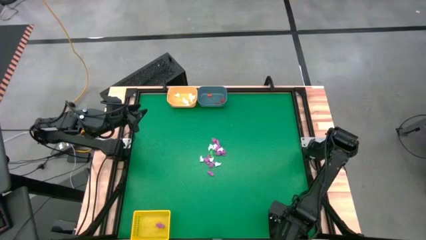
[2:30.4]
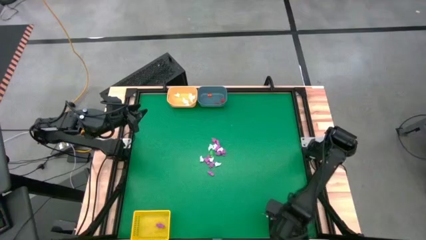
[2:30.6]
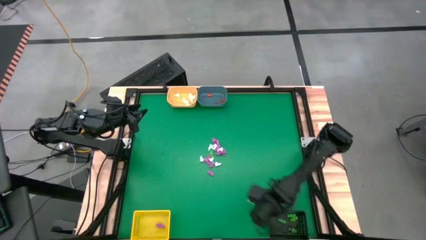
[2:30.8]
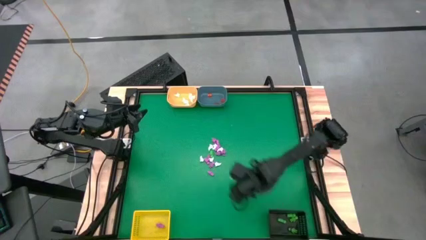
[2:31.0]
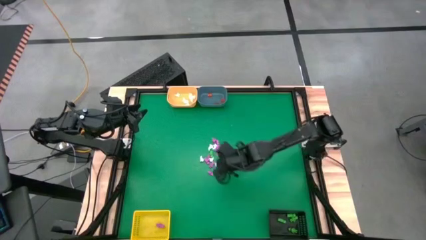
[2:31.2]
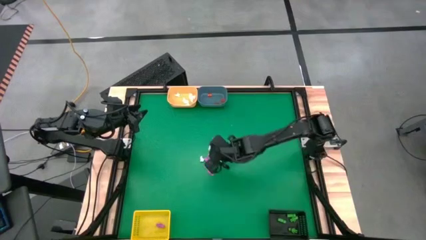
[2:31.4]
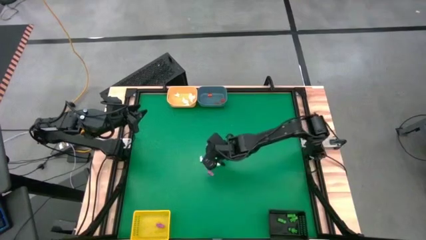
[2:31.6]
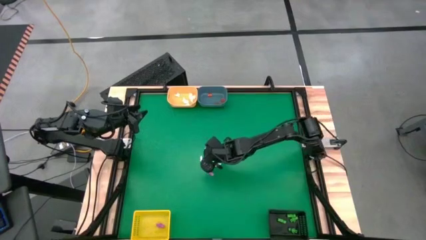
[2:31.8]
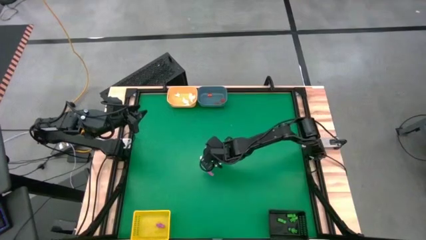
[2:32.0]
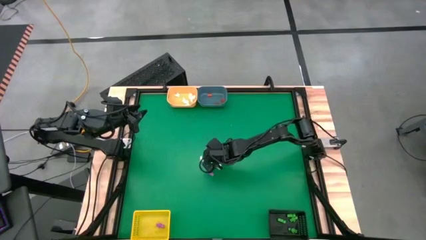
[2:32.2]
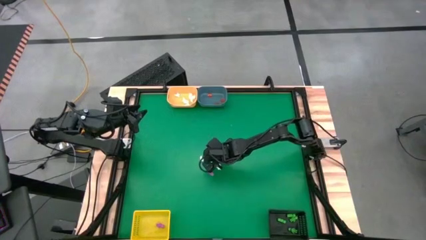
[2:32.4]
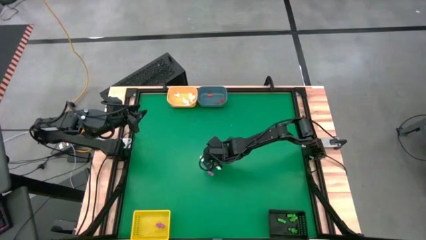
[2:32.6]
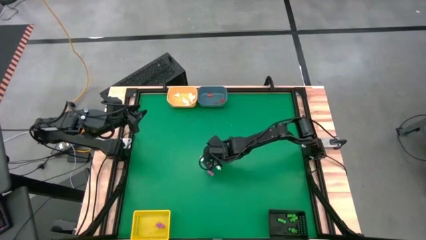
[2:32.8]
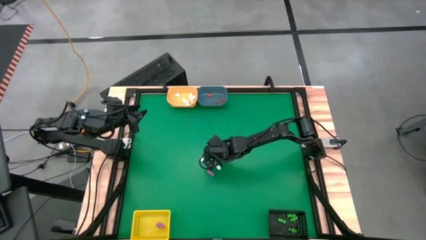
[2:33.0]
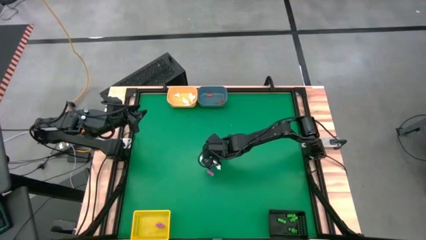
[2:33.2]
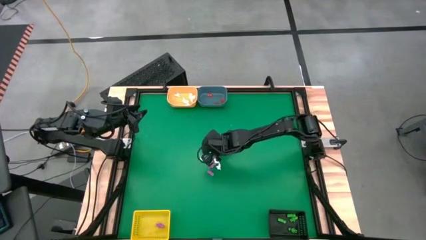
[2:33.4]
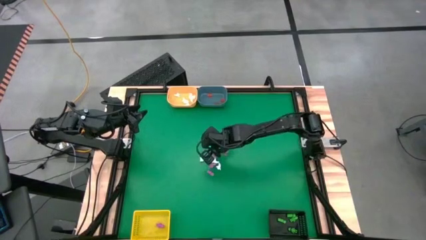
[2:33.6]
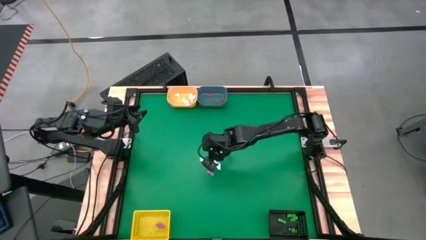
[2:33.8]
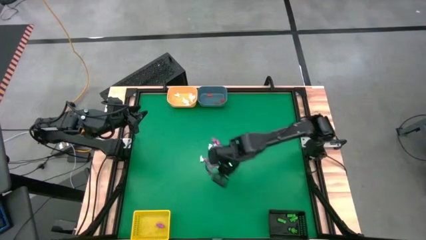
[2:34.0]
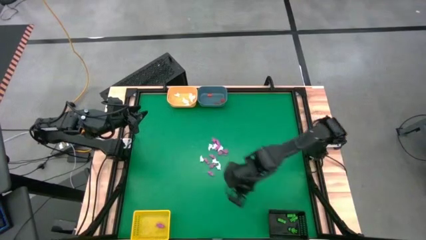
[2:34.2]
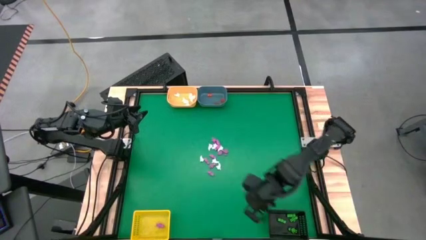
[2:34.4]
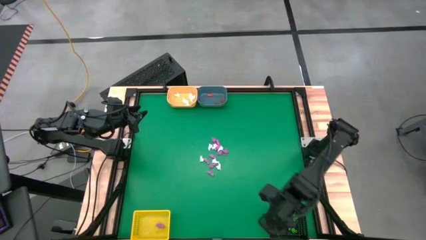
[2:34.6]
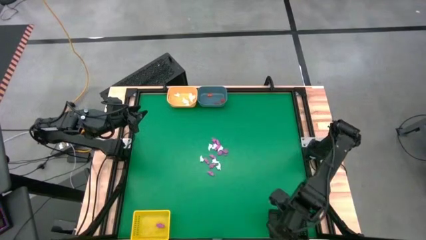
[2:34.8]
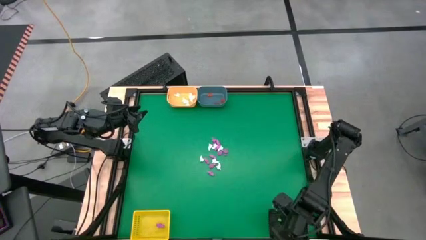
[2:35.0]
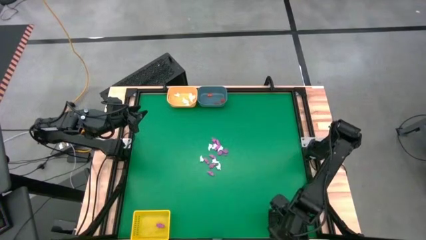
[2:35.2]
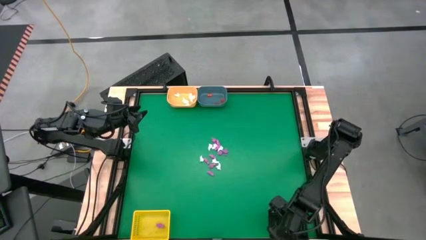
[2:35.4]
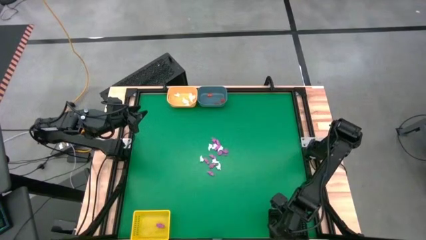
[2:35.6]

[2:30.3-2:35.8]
Task: Sort Halloween decoration
Put the green skeleton into the black bin

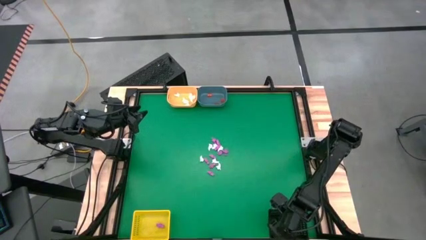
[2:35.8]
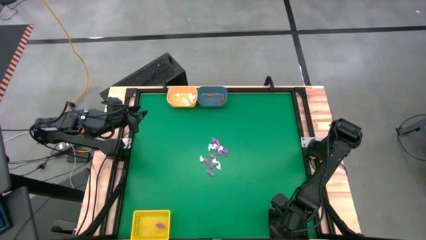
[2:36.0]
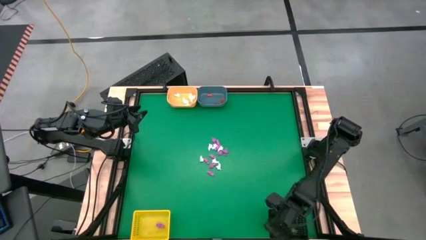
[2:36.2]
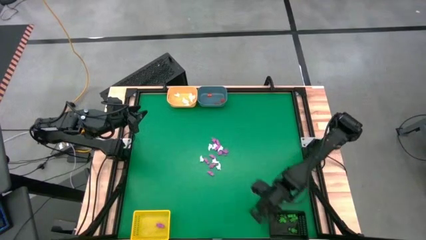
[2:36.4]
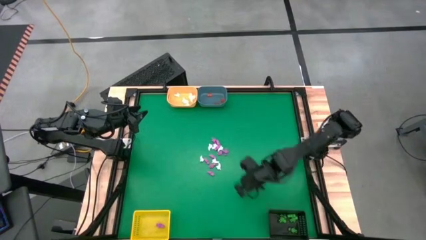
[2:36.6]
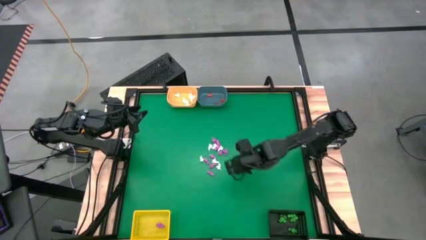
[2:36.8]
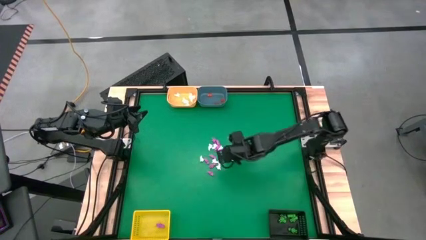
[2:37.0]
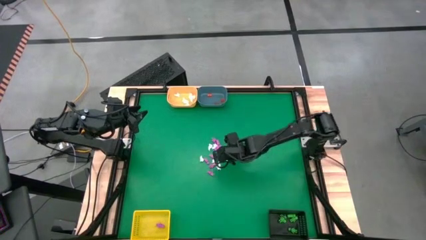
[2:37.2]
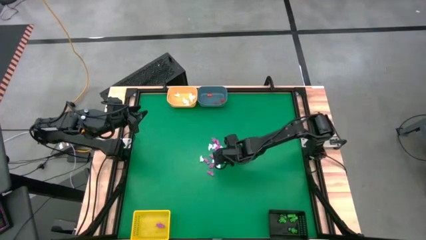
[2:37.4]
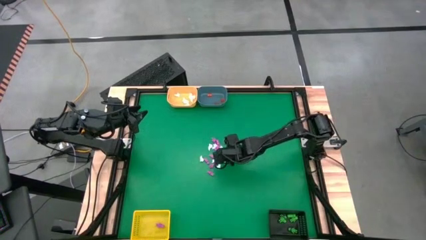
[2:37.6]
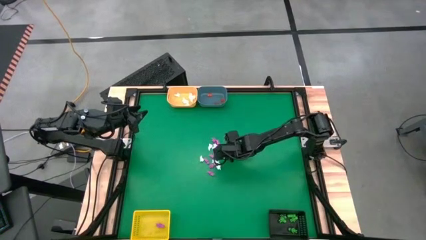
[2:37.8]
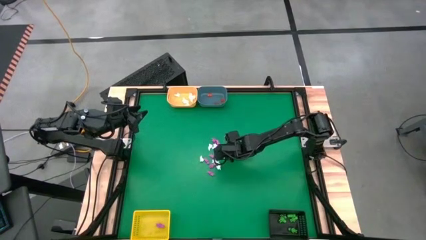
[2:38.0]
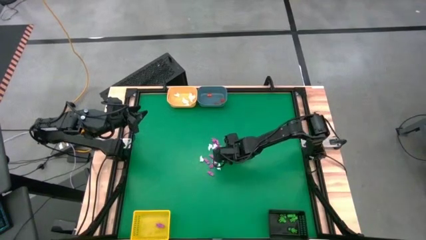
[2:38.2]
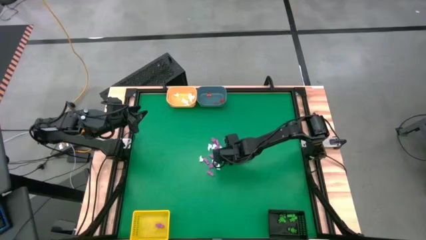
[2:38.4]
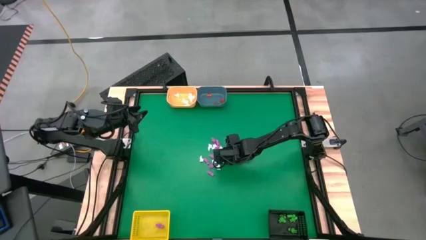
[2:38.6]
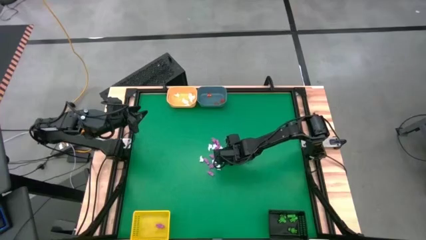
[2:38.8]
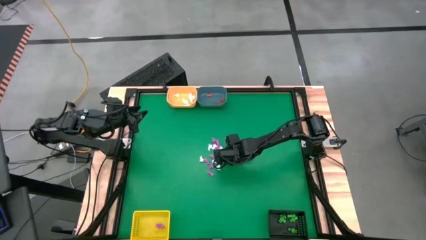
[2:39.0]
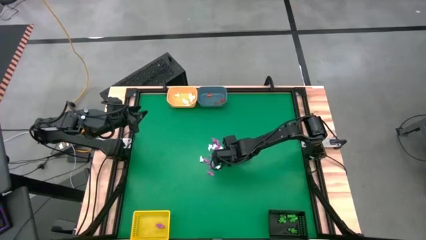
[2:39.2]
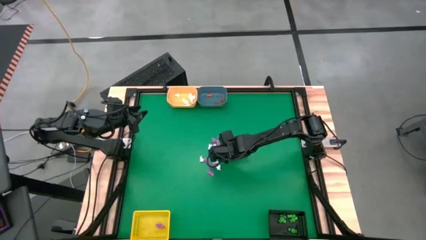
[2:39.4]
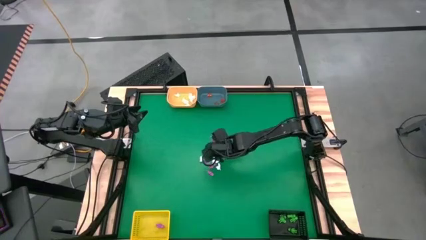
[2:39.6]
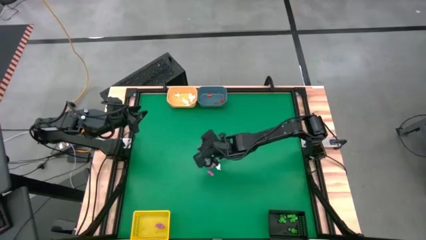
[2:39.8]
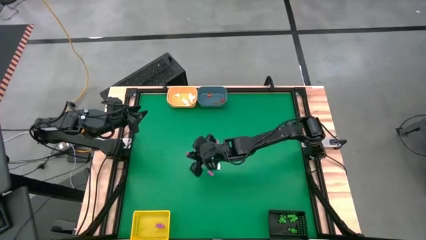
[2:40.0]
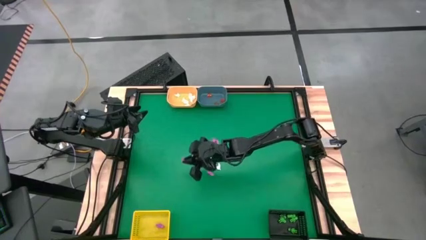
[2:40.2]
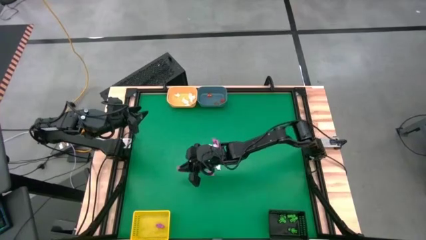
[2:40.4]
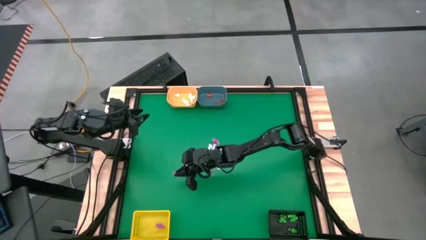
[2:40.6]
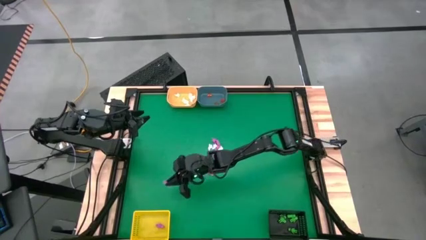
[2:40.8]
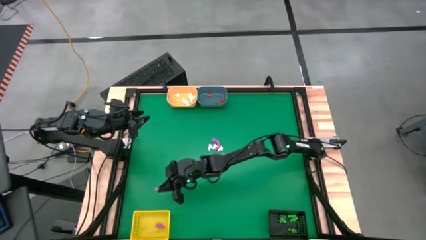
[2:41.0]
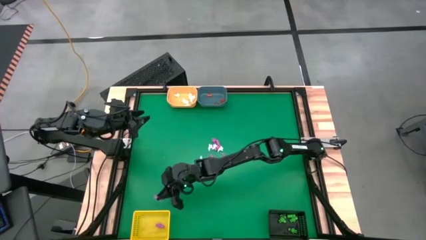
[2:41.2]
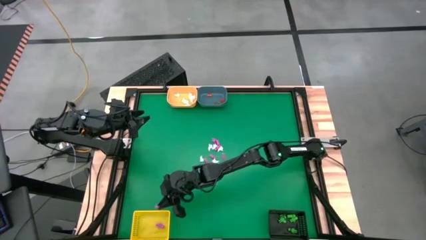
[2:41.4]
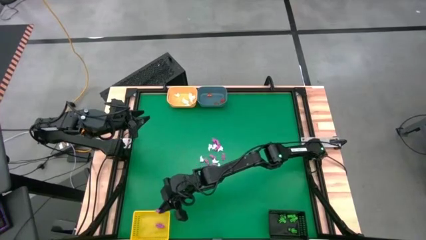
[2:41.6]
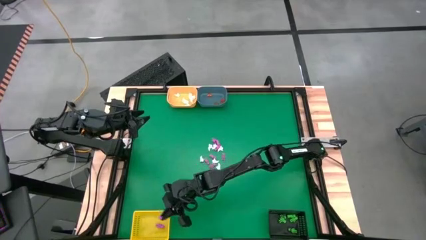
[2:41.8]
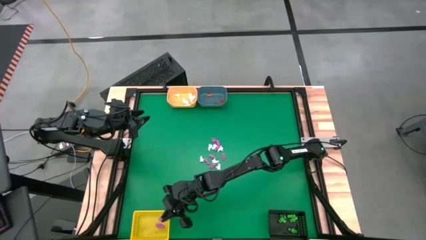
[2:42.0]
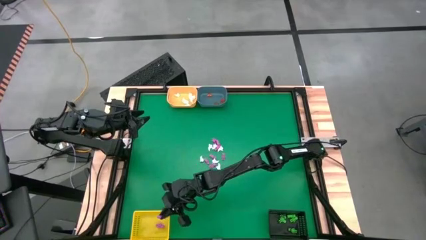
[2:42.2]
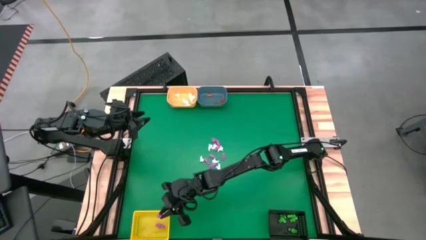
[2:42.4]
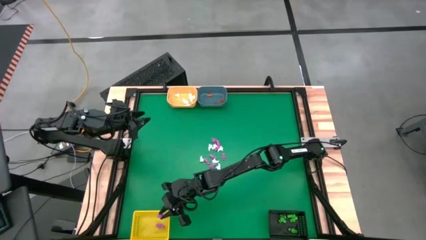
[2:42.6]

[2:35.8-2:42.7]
Put the pink skeleton into the yellow bin

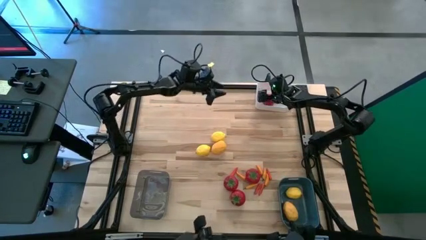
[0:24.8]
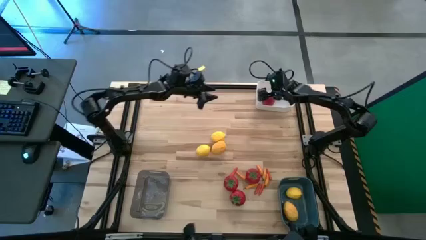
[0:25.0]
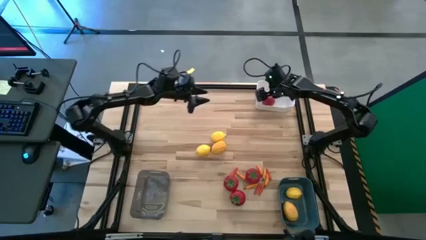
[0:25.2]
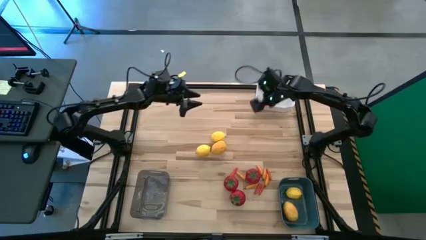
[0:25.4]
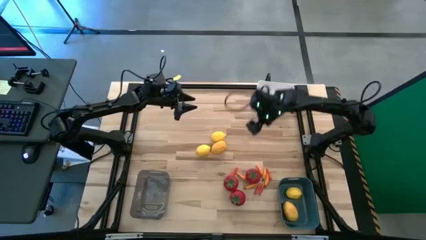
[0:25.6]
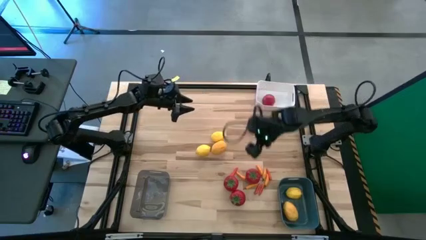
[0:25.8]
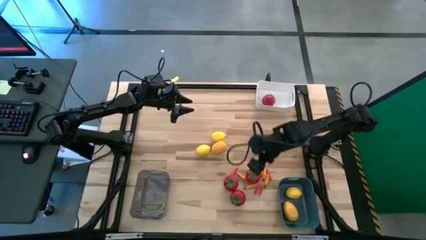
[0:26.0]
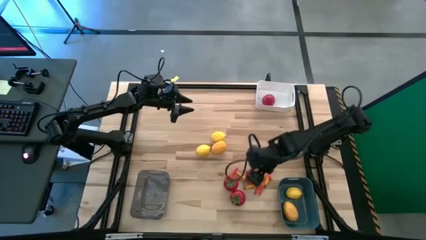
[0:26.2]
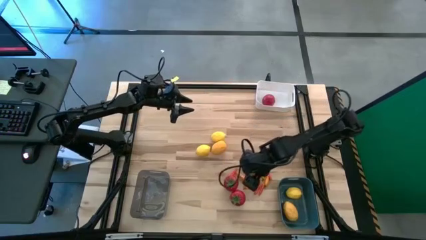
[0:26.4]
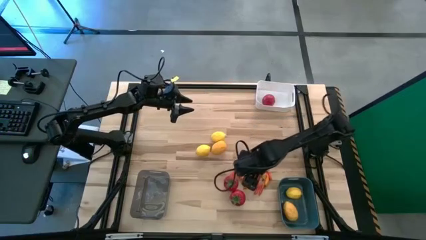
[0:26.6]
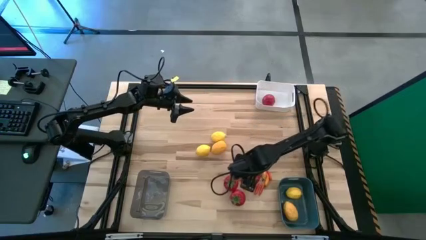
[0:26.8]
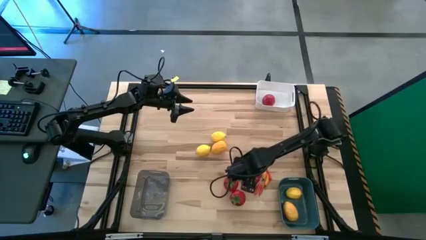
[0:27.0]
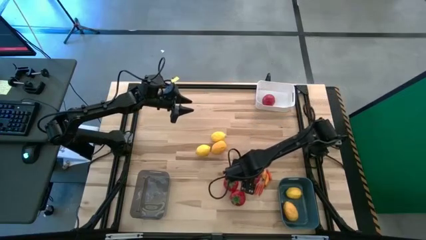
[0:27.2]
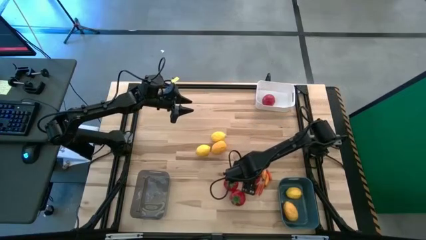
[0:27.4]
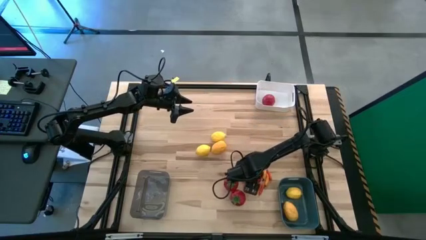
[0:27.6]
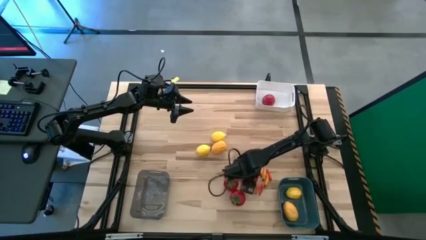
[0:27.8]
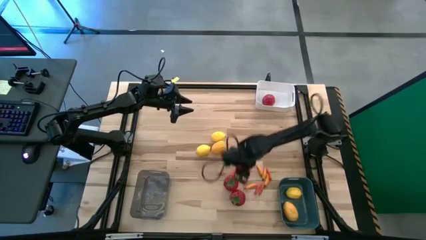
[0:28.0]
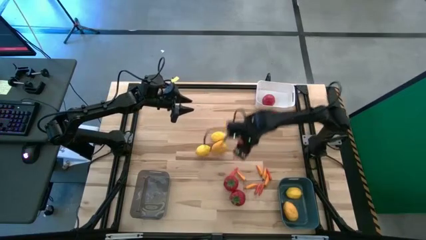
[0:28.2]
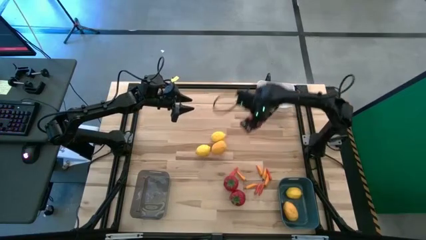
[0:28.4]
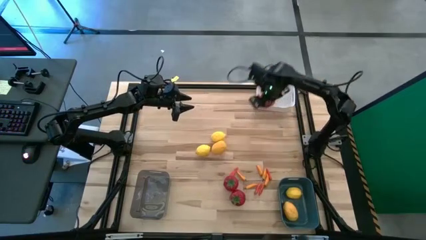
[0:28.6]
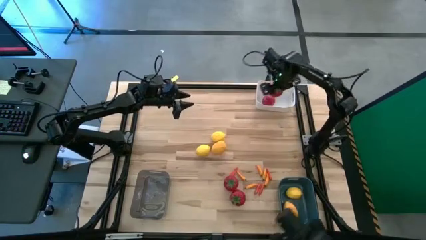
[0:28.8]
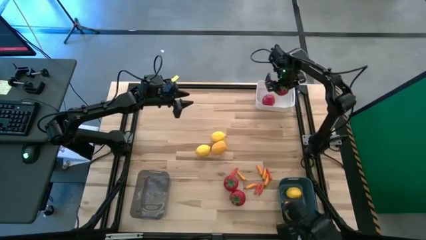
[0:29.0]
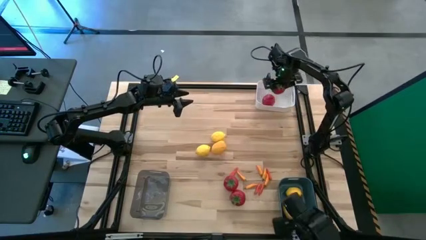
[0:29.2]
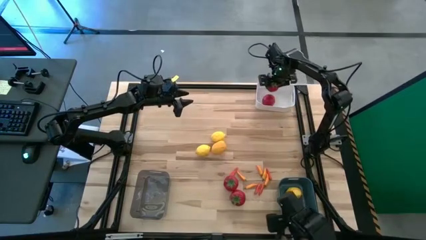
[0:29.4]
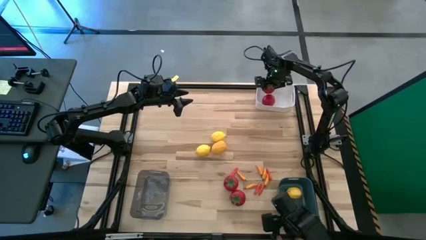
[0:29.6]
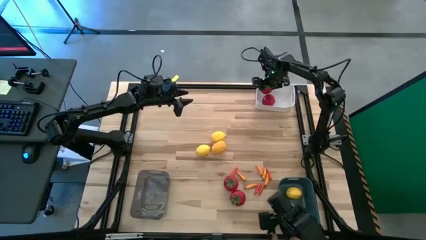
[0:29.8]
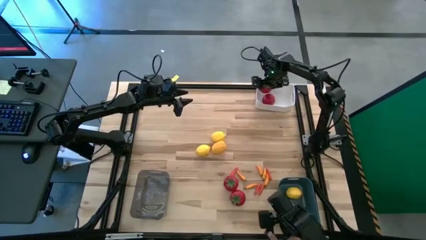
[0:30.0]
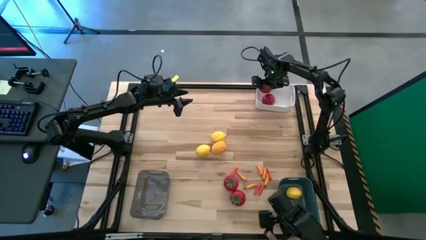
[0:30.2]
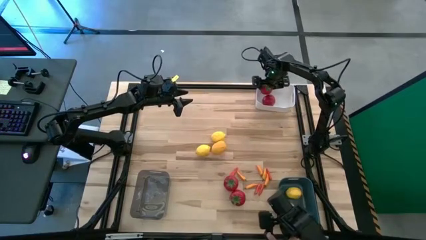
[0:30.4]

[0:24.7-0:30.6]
Task: Sort produce into baskets
Put the tomato into the white bin
